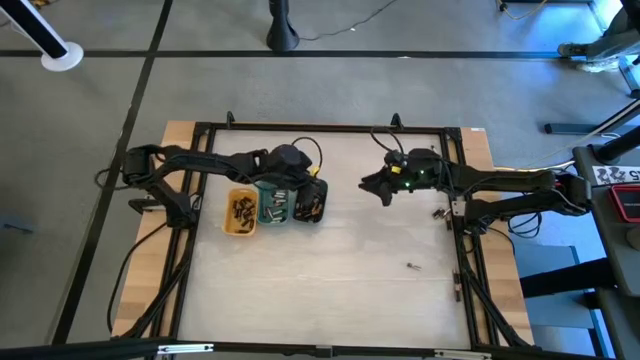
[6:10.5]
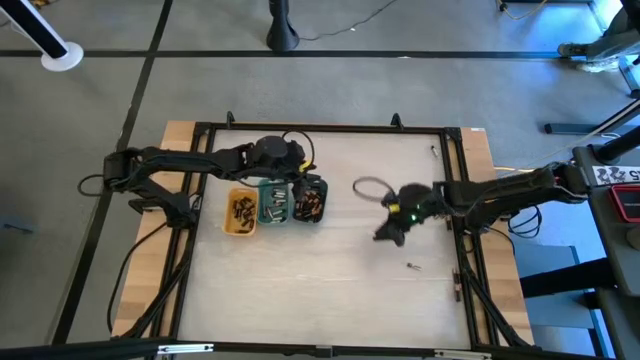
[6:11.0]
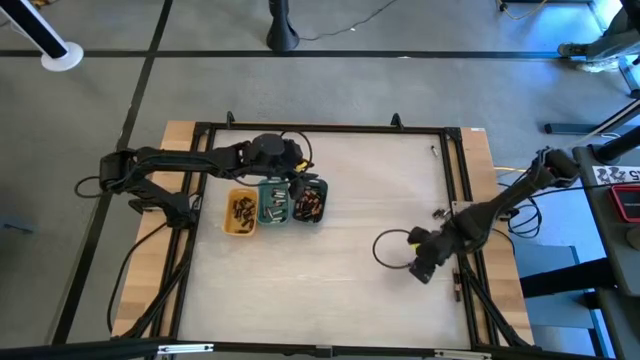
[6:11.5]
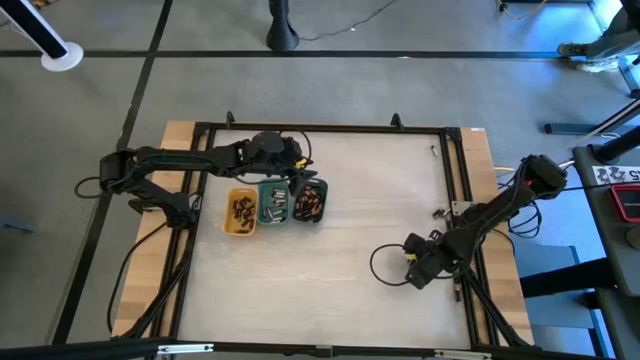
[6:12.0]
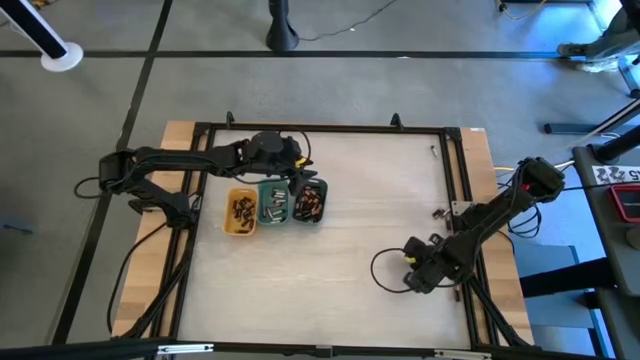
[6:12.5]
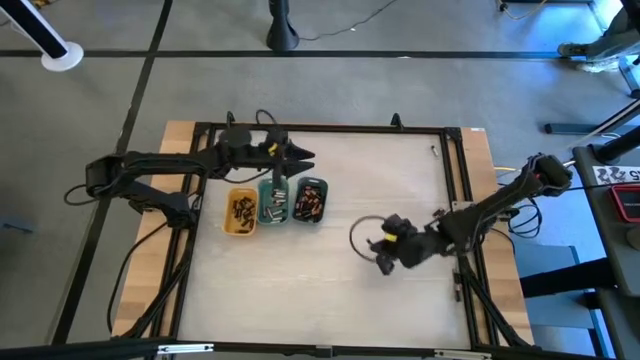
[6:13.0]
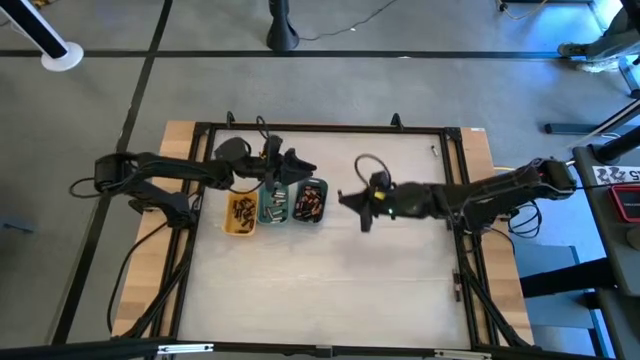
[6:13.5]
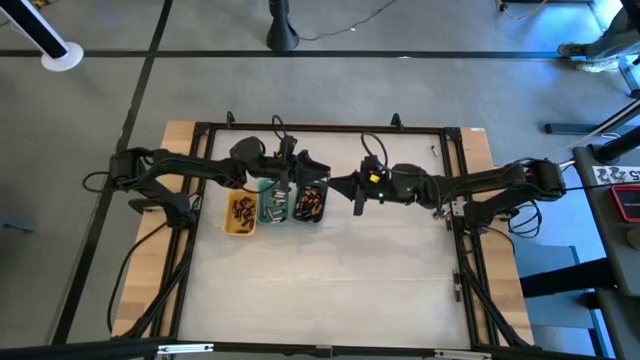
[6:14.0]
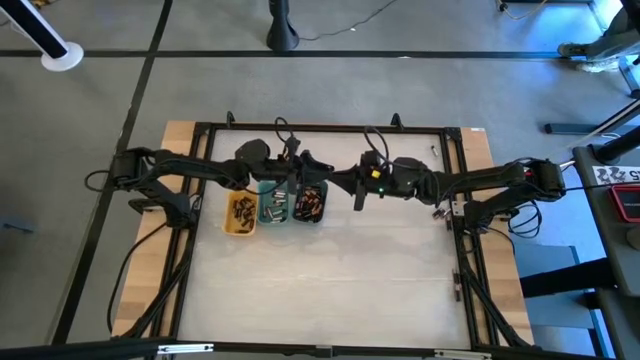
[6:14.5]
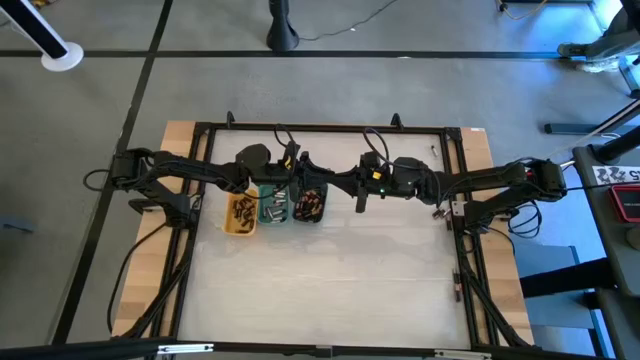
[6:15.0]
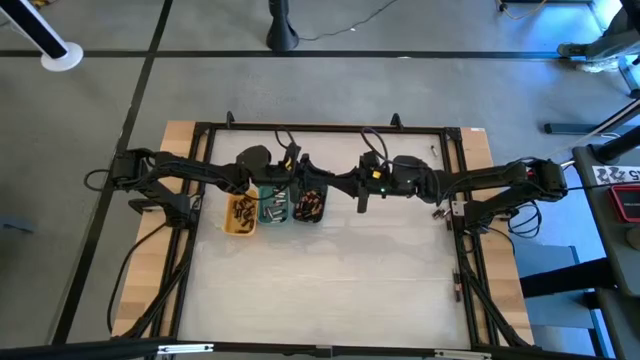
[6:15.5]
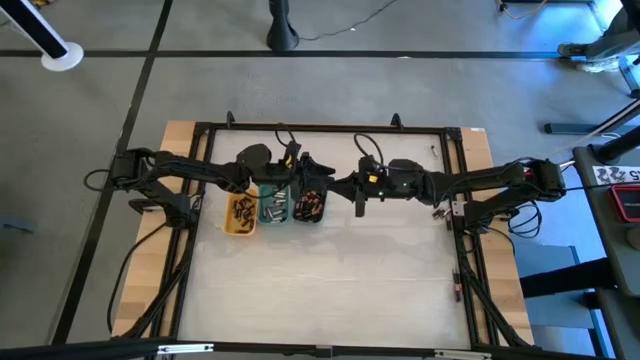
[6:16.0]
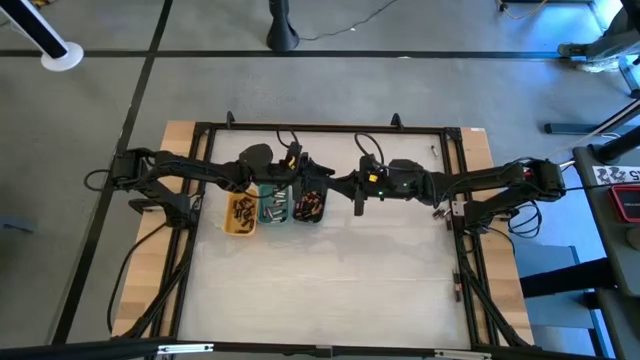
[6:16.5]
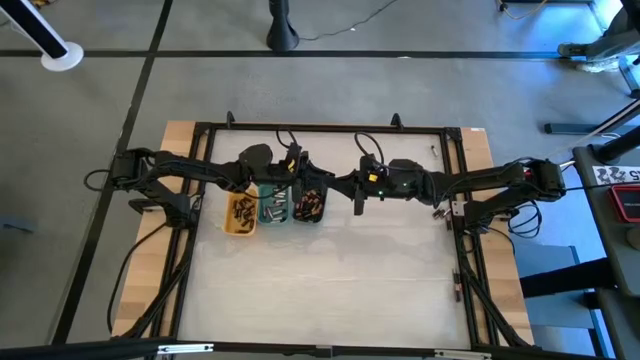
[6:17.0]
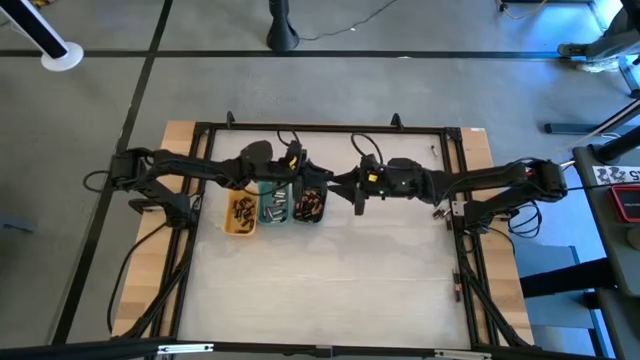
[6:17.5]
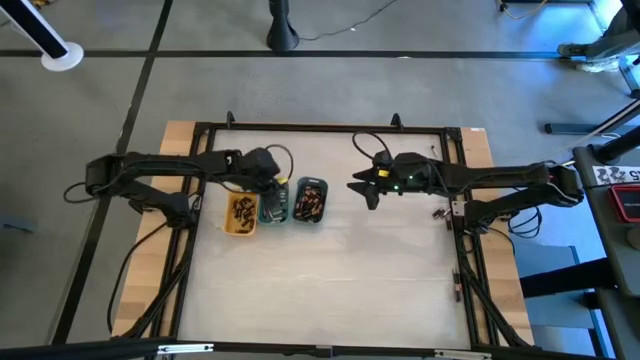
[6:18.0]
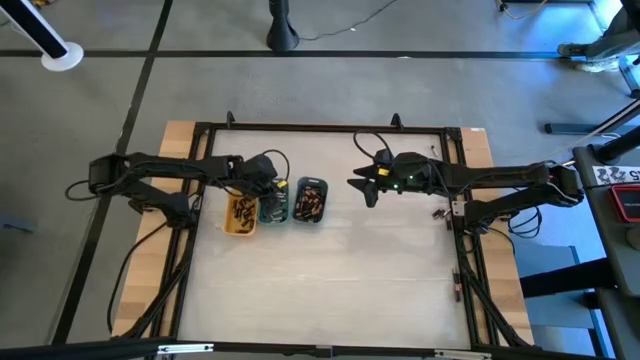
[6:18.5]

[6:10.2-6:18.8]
Task: Sort batteries
Put the silver battery into the green bin

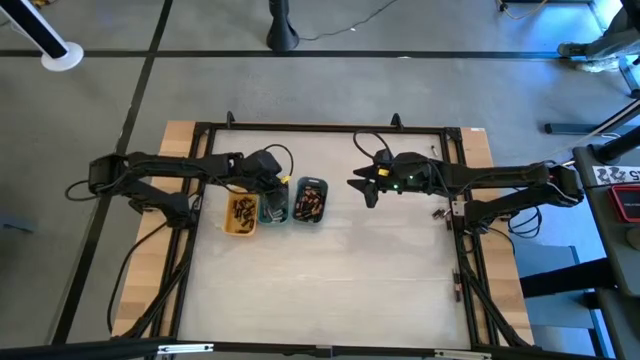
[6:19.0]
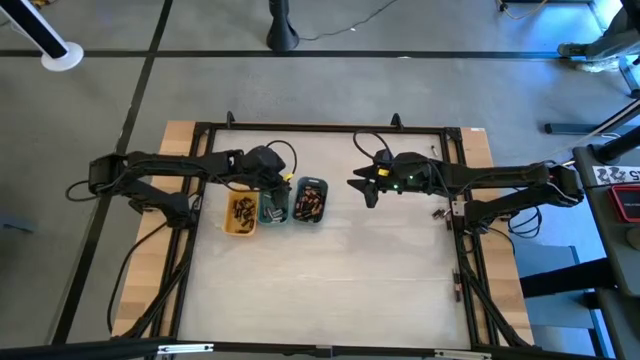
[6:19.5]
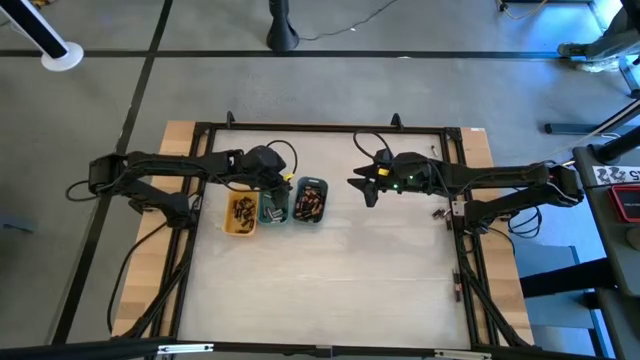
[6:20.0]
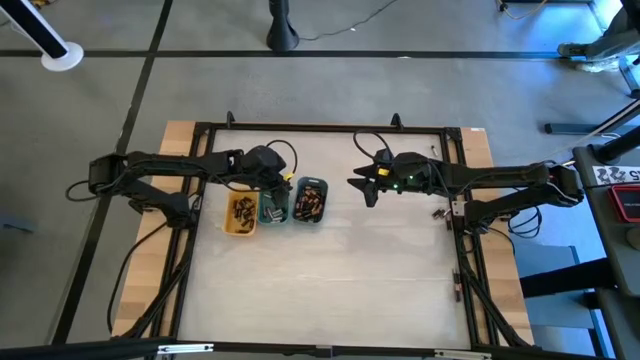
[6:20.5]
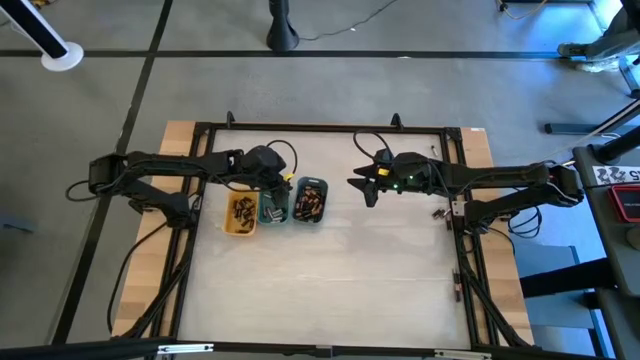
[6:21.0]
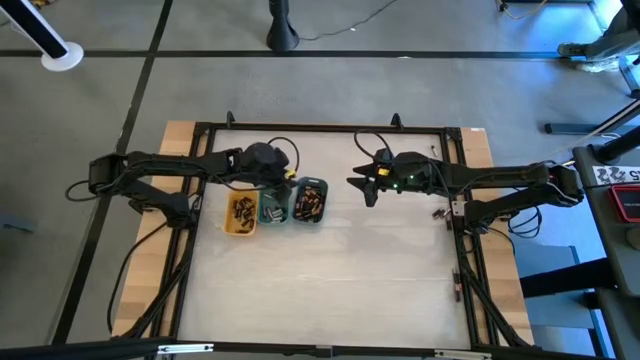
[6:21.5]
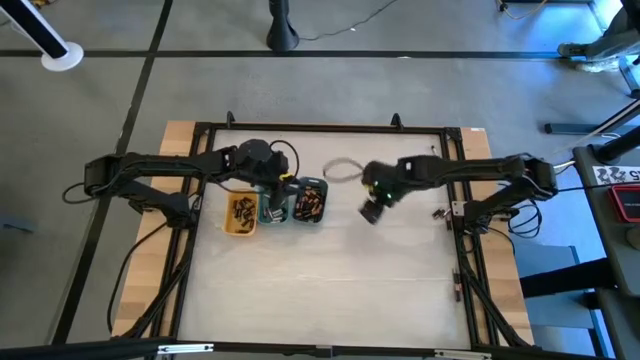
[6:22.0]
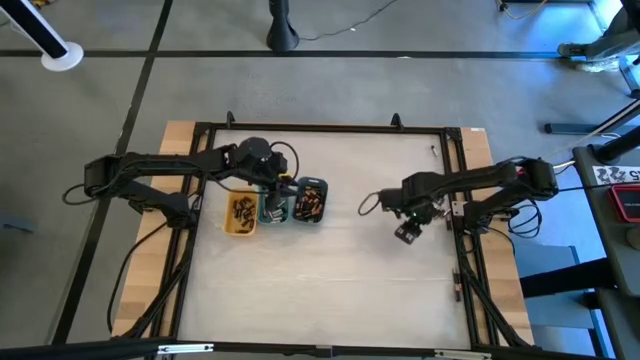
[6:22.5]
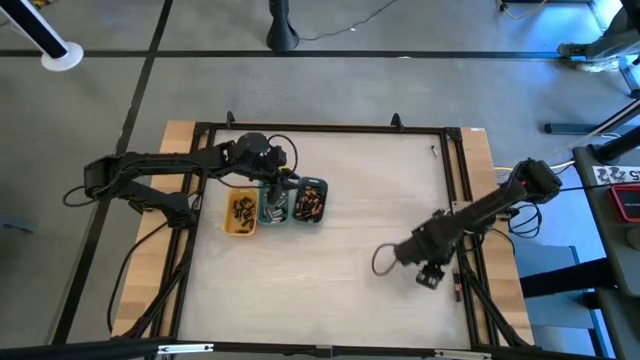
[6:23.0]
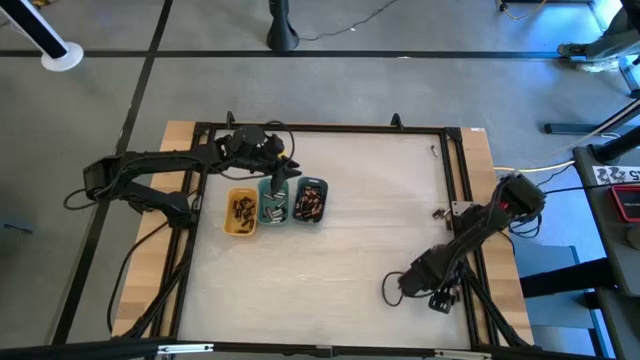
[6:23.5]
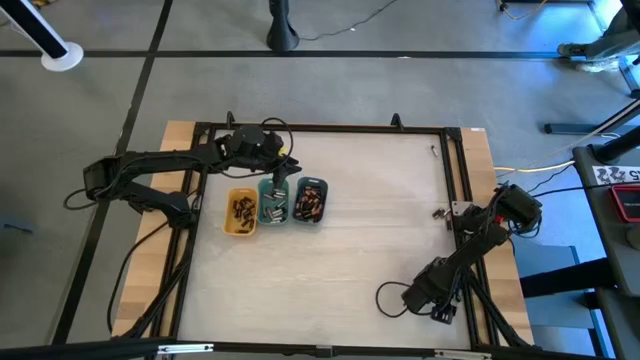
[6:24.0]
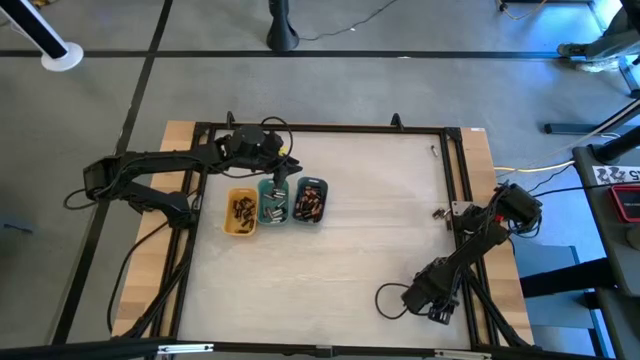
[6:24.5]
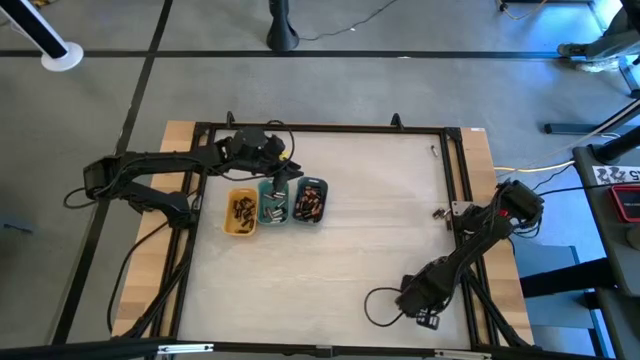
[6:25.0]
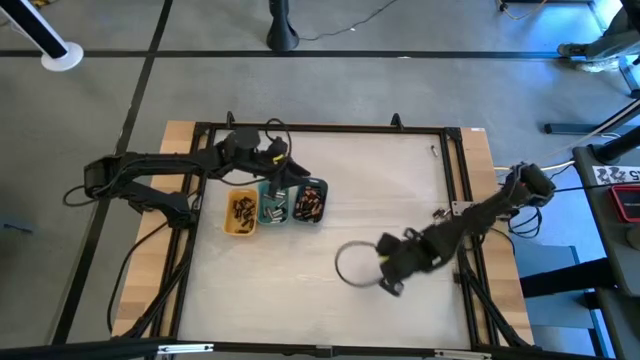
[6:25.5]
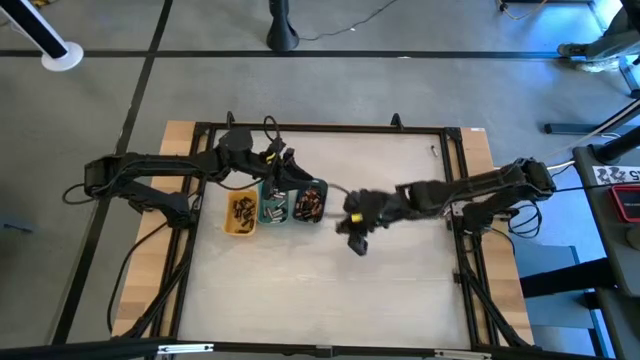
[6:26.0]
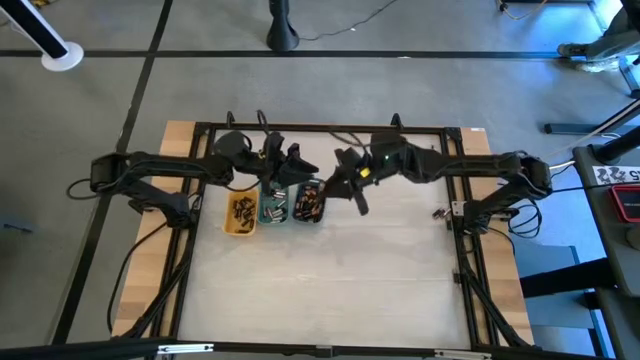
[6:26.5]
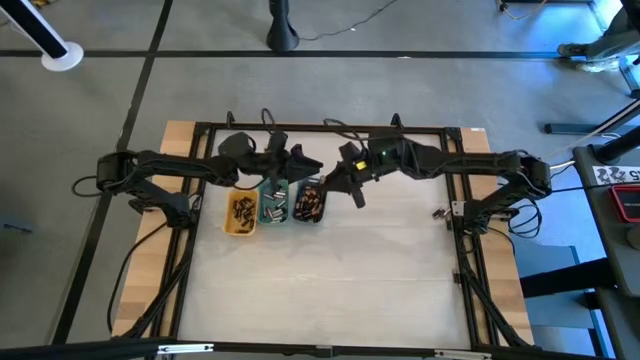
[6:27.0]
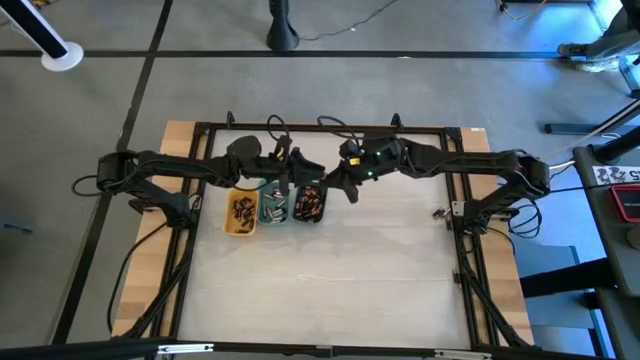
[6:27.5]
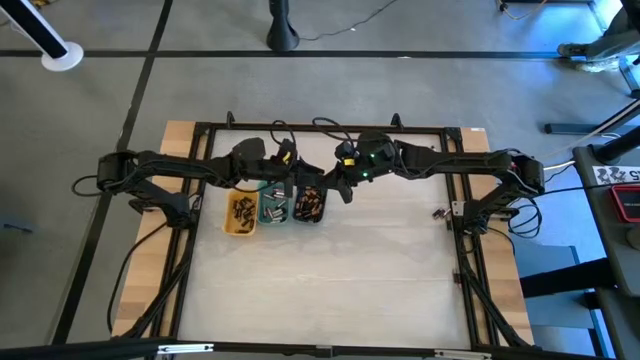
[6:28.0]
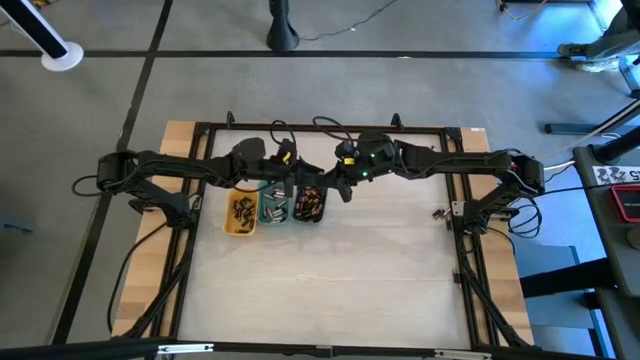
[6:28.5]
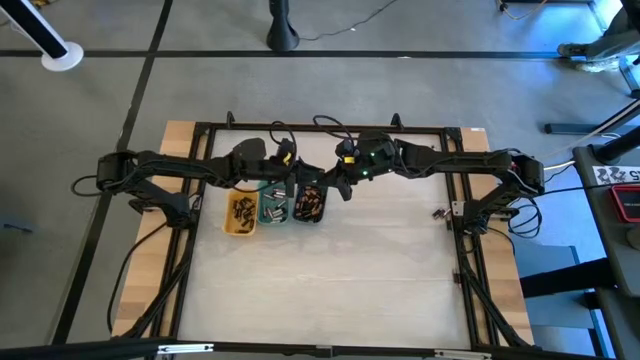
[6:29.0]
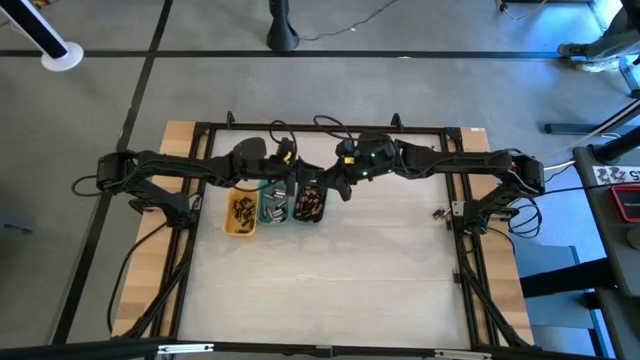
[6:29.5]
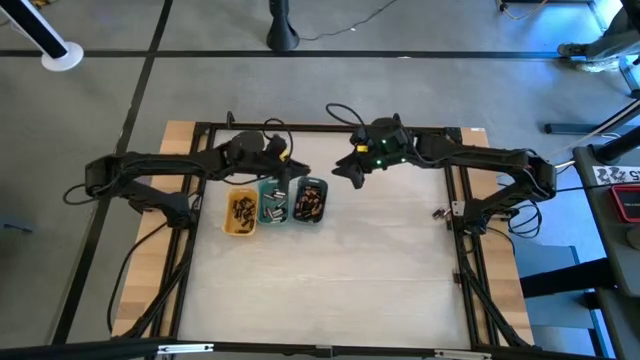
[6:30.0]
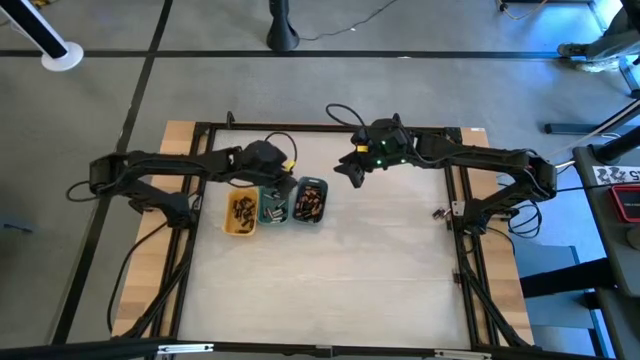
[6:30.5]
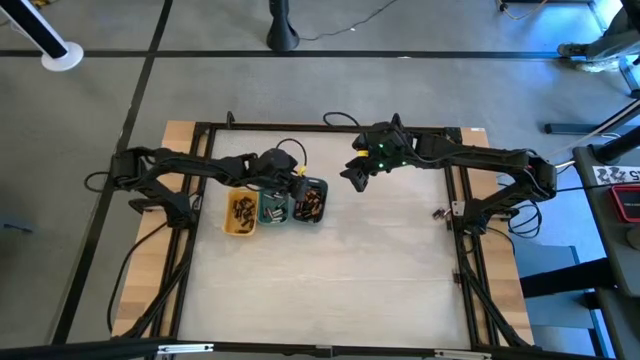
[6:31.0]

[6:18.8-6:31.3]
Put the large black battery into the blue bin
